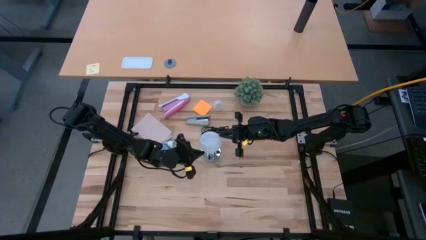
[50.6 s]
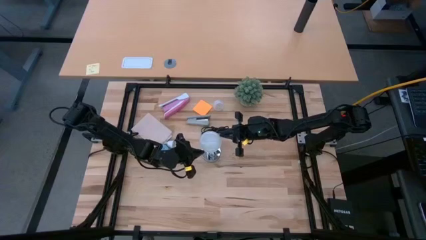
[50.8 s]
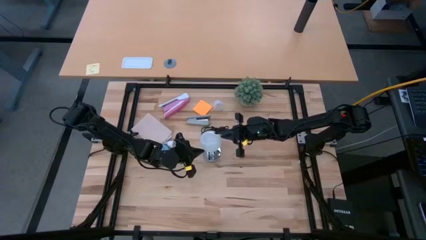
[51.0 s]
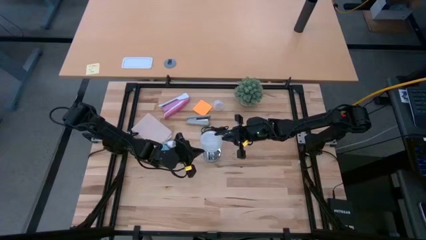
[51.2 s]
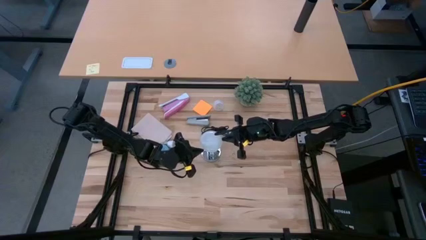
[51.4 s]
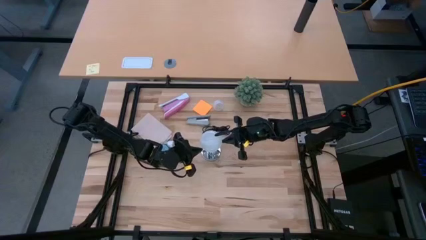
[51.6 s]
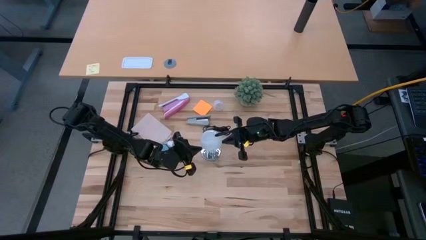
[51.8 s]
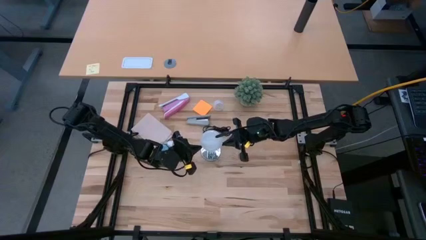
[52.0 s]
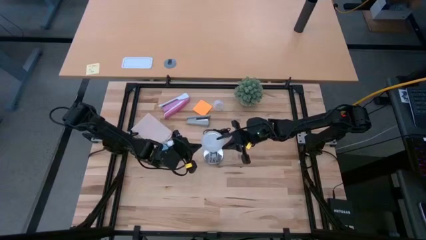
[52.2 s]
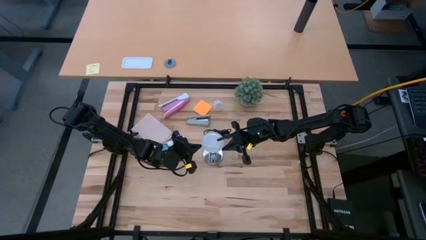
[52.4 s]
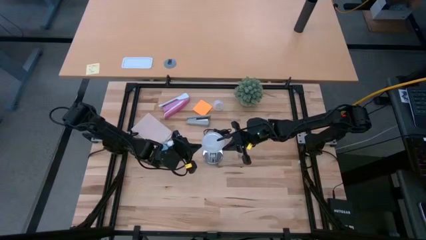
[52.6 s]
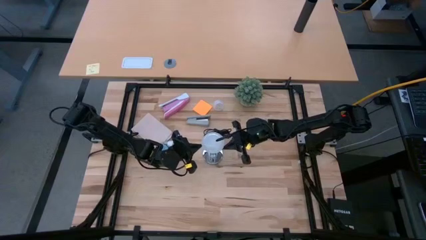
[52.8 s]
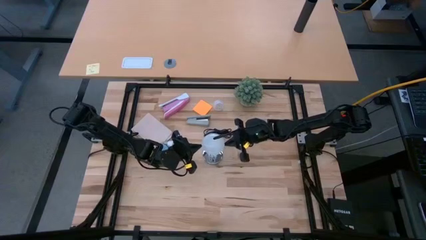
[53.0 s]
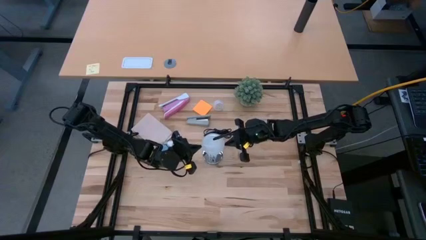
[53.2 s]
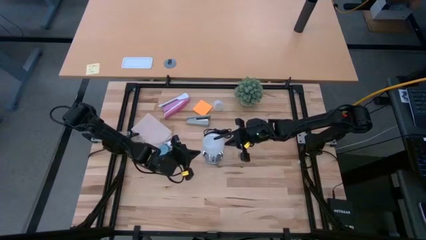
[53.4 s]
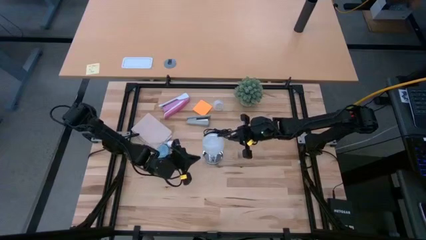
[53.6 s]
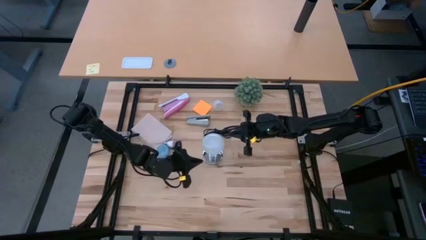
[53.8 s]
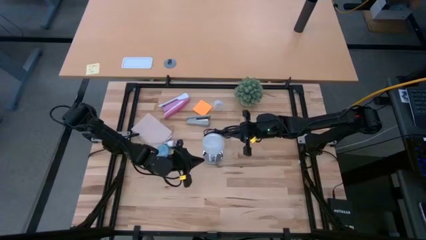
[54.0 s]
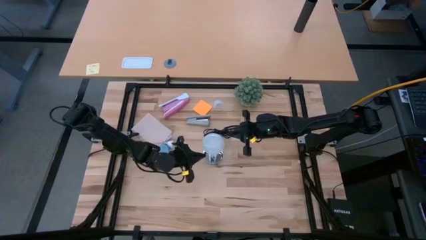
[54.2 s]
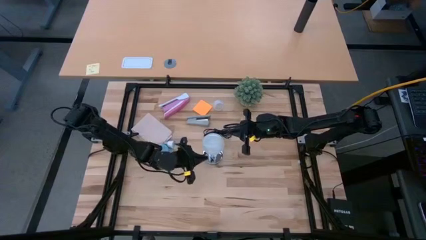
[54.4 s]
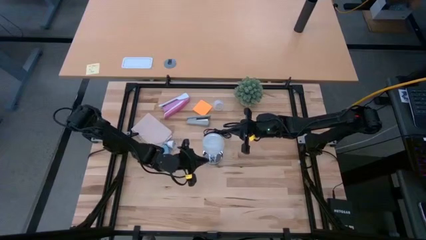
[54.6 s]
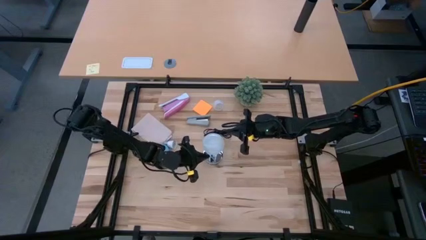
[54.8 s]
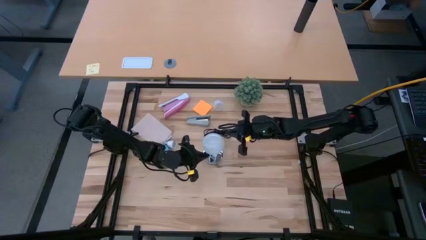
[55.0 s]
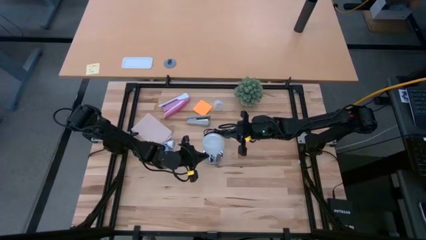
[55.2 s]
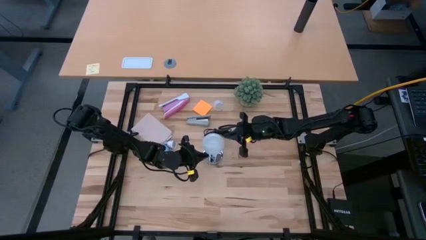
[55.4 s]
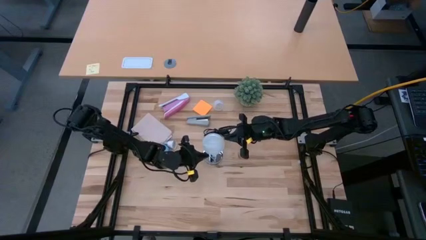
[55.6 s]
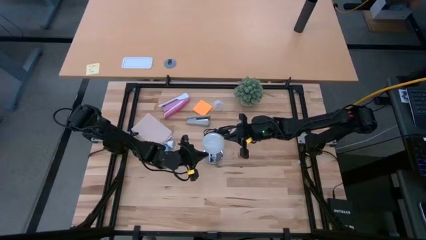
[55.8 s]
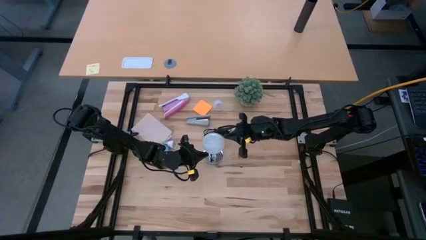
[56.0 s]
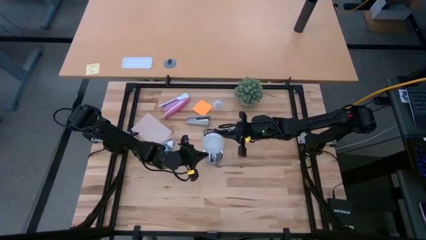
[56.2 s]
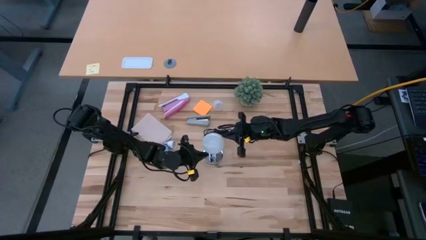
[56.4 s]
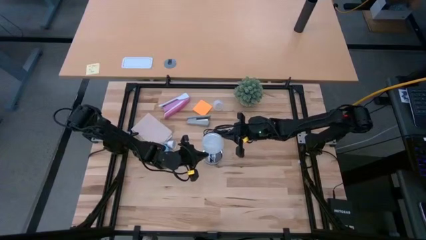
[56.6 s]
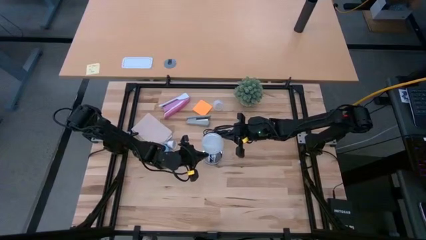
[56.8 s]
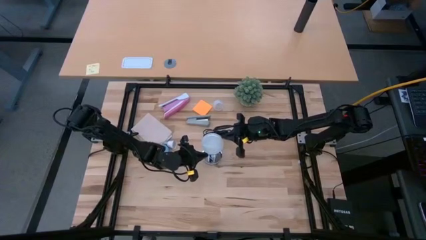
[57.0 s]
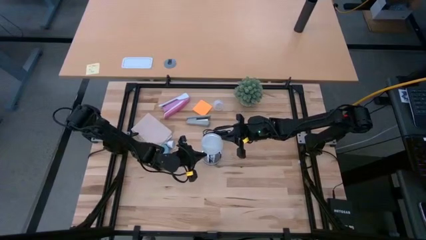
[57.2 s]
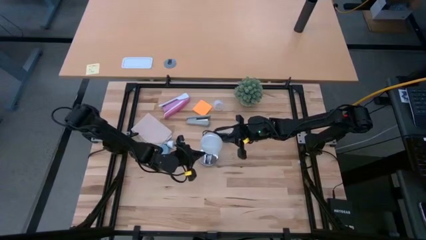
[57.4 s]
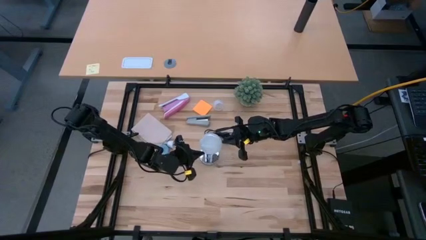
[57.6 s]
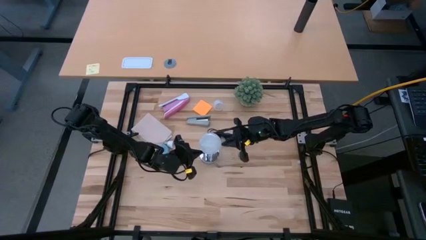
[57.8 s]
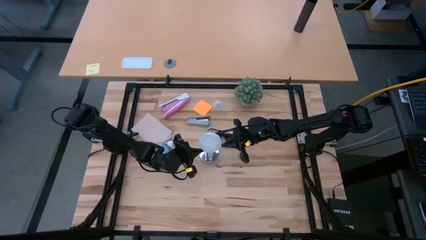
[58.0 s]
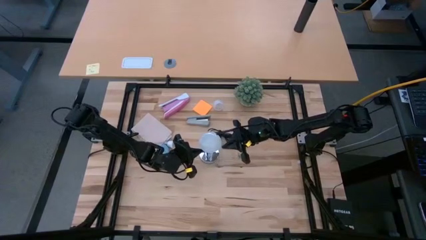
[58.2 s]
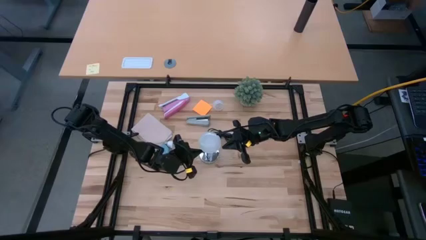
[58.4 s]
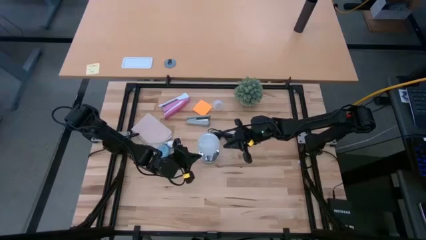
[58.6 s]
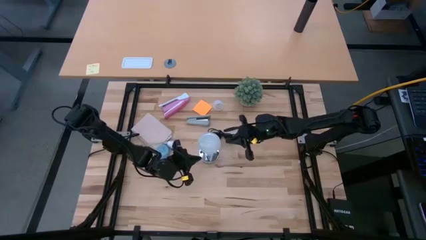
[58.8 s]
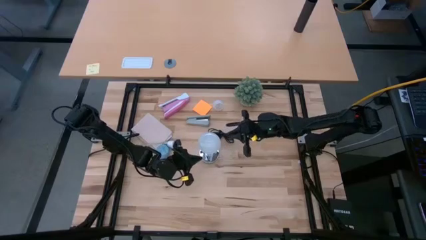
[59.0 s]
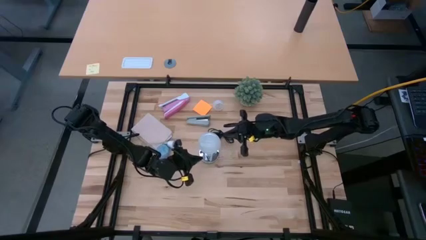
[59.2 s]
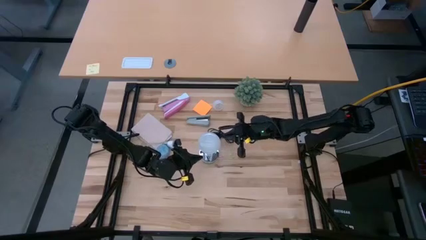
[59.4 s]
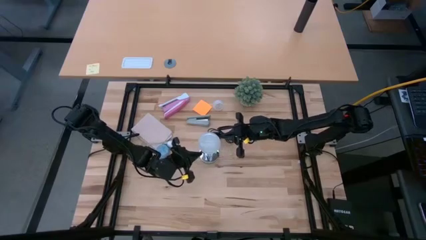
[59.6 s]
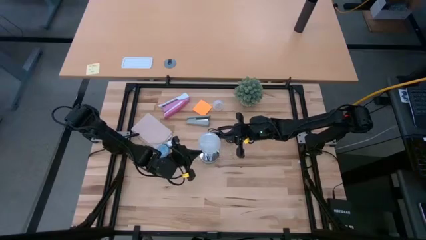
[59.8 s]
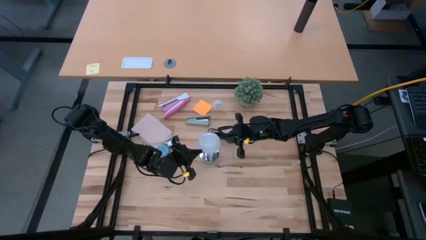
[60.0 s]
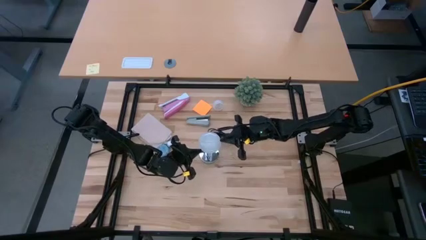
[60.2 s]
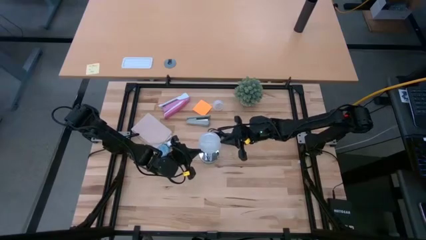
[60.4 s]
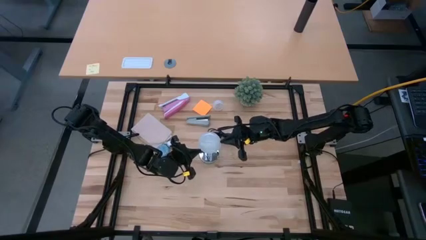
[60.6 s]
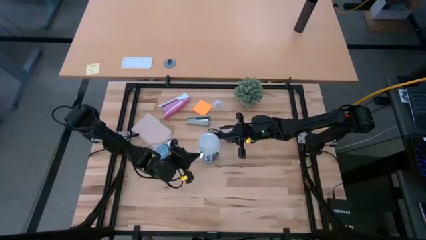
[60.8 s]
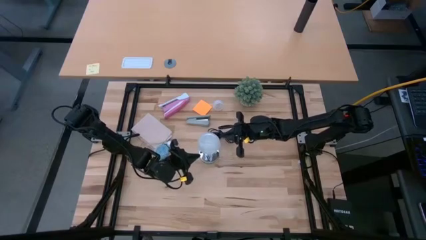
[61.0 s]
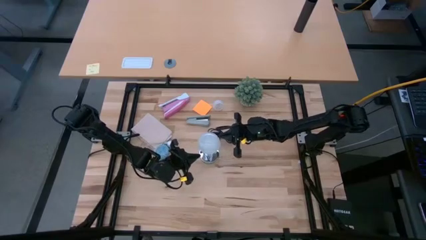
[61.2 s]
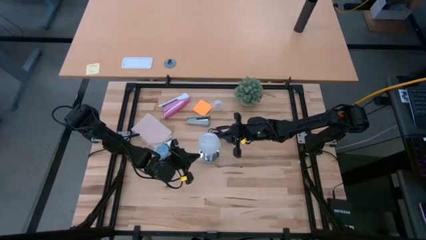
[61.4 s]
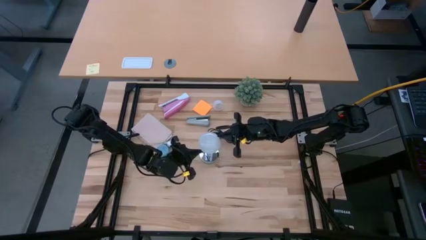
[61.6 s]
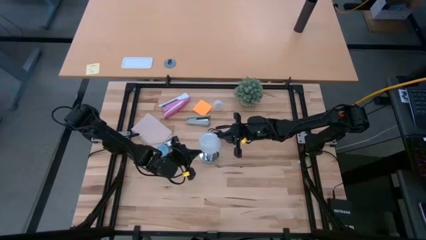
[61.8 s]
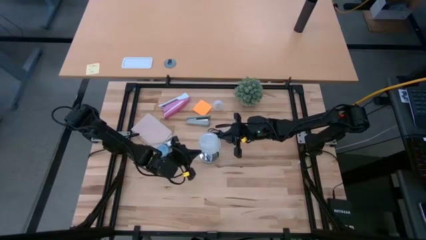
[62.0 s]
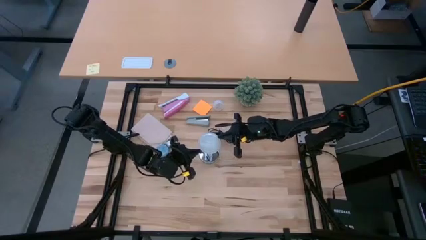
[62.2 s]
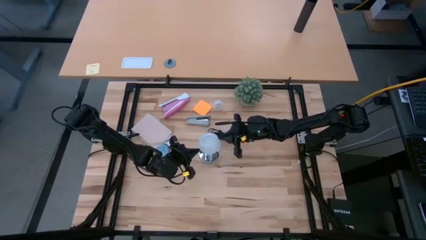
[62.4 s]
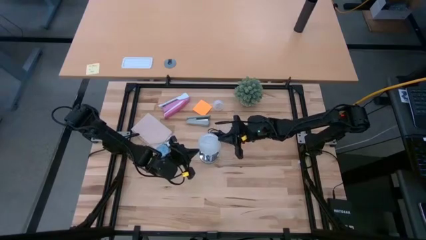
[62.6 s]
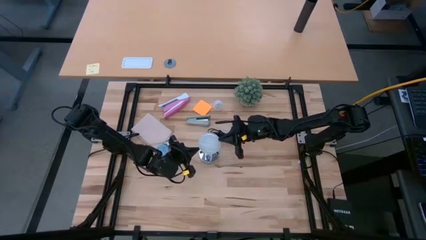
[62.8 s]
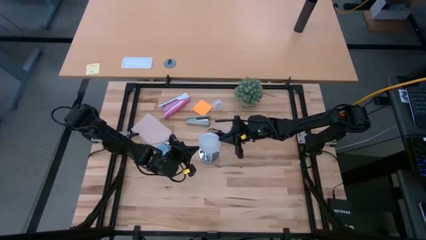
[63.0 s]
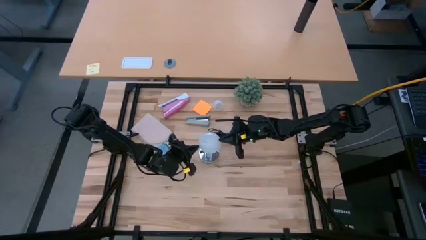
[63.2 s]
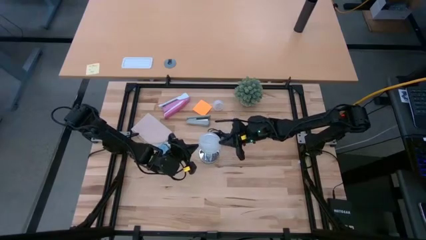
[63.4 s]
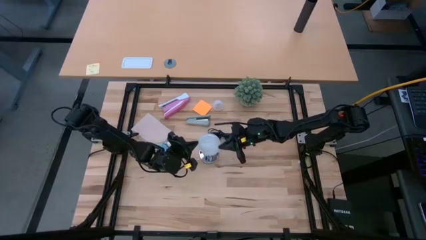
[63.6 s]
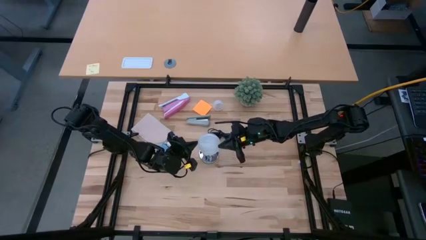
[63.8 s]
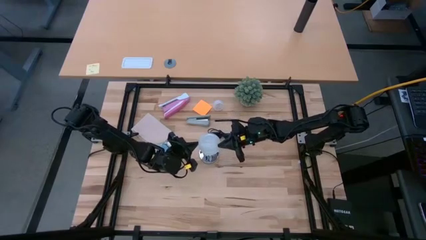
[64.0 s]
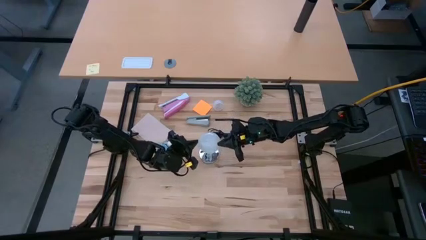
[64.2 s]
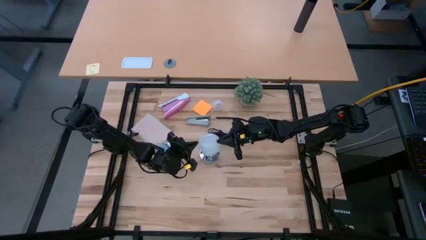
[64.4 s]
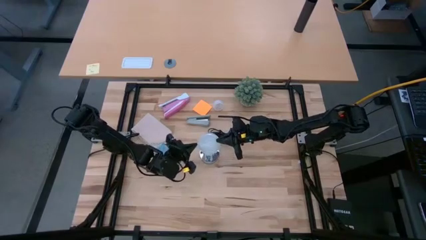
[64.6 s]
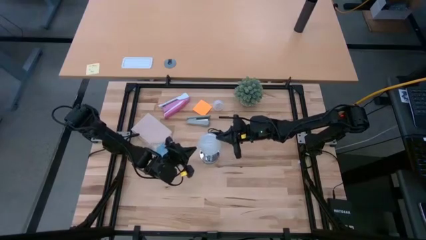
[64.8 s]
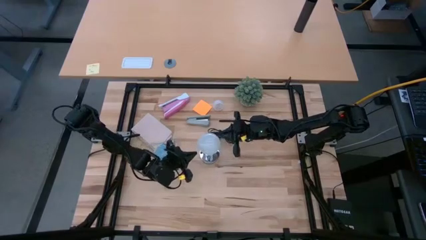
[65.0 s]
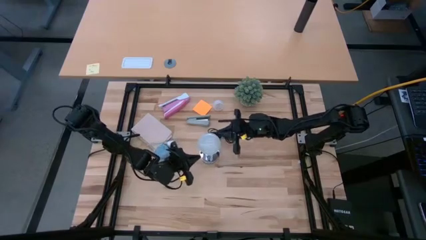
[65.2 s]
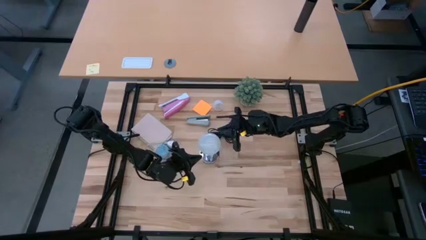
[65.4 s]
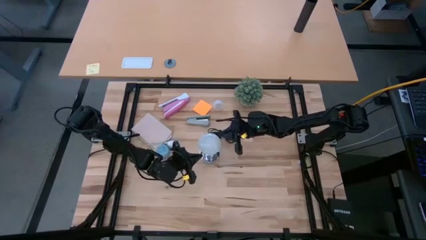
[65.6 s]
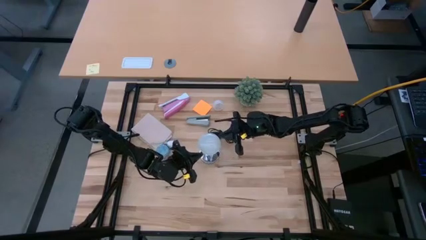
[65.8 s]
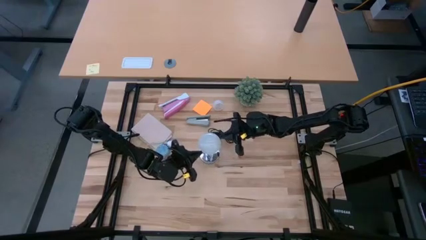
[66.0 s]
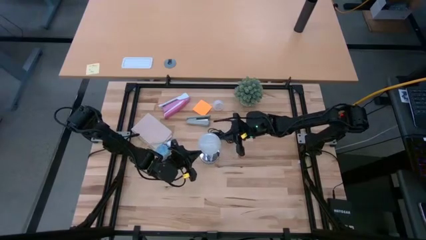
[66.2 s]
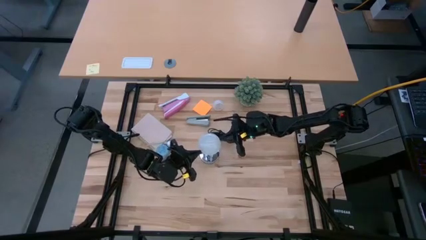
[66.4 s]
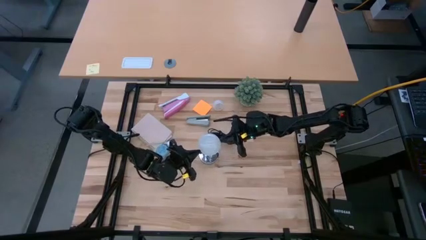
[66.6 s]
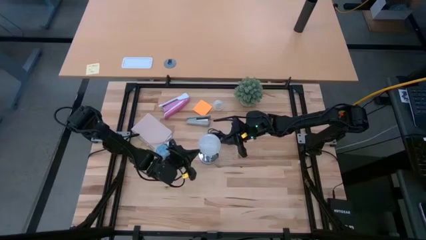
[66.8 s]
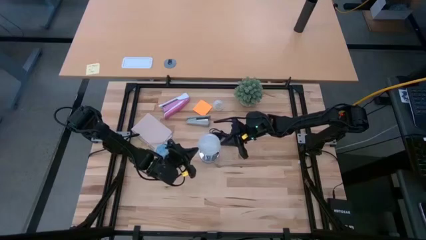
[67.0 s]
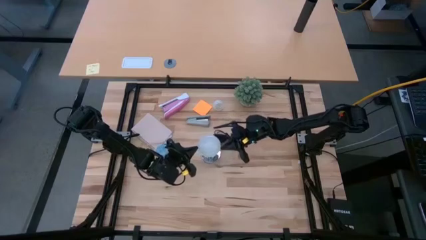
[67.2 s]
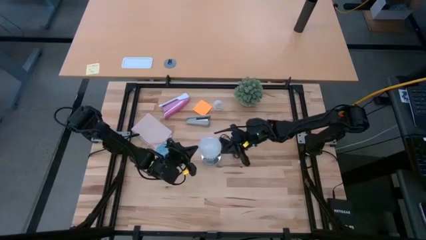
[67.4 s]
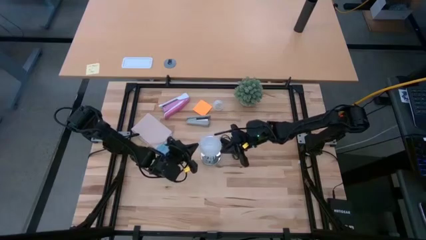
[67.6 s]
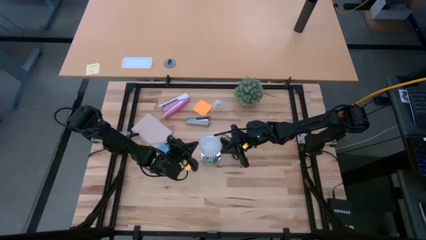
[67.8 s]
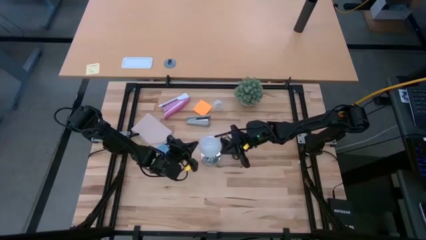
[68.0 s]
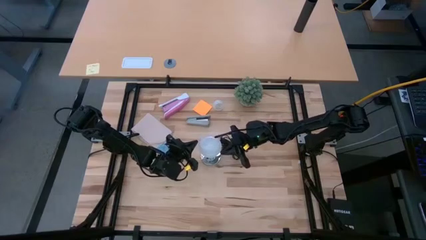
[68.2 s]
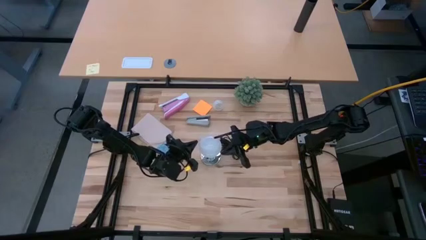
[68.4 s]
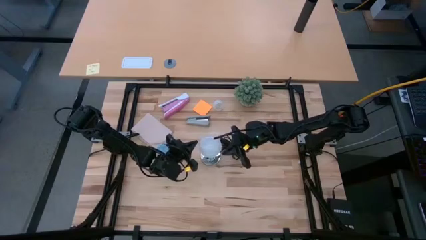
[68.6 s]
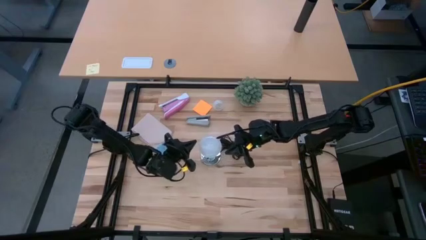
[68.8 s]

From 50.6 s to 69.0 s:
Task: Screw lightbulb
Insert the lightbulb on the lamp
